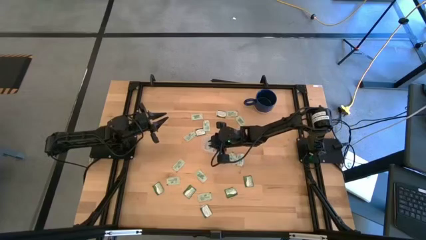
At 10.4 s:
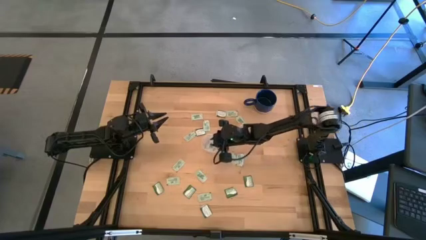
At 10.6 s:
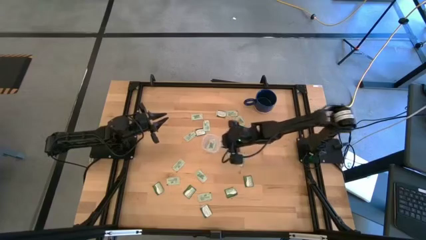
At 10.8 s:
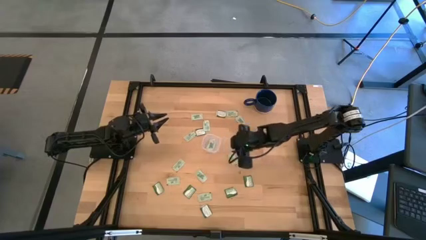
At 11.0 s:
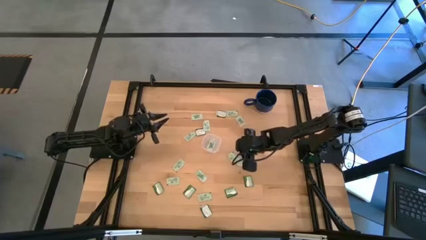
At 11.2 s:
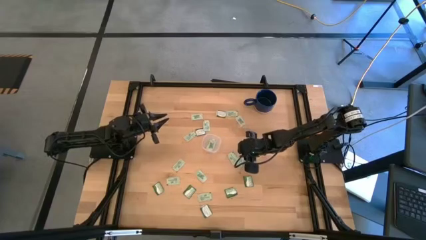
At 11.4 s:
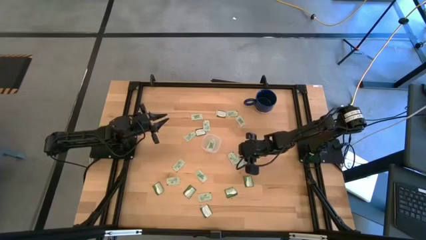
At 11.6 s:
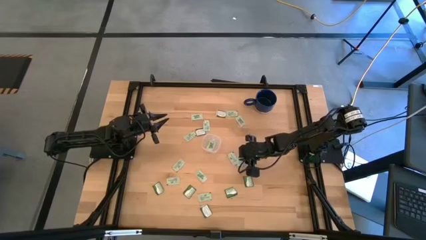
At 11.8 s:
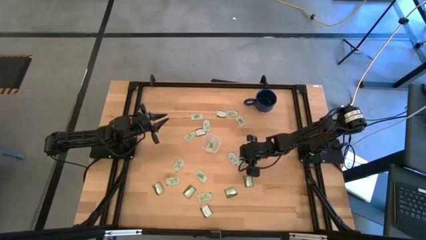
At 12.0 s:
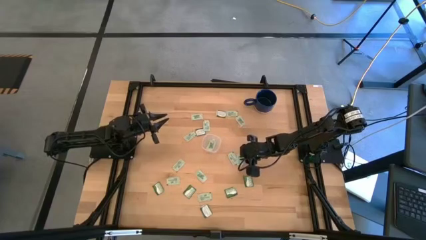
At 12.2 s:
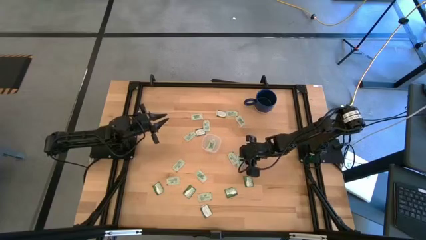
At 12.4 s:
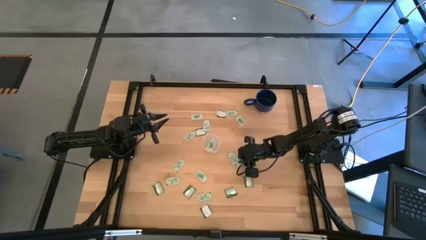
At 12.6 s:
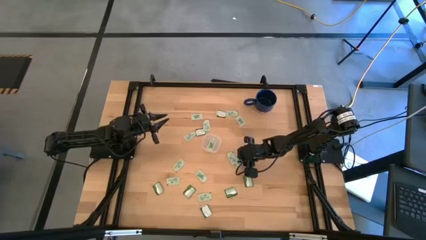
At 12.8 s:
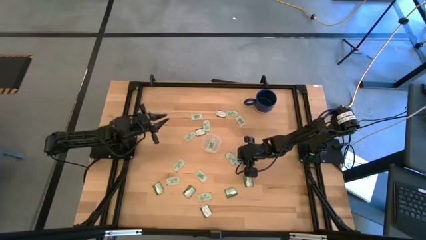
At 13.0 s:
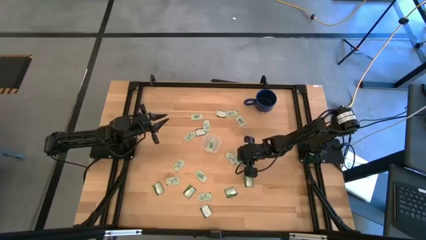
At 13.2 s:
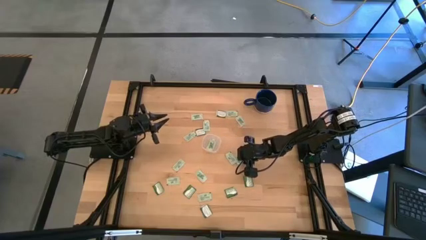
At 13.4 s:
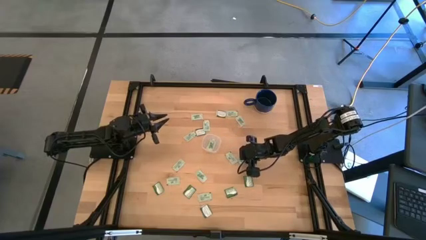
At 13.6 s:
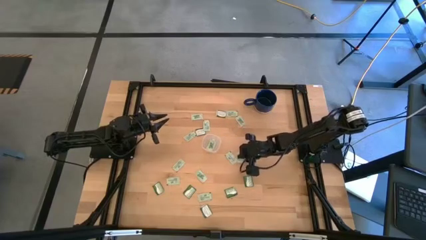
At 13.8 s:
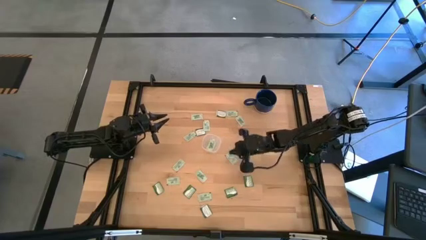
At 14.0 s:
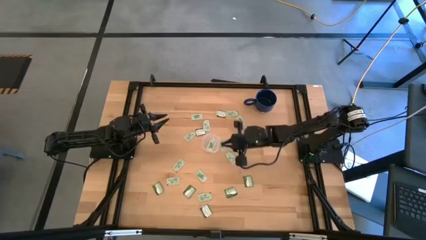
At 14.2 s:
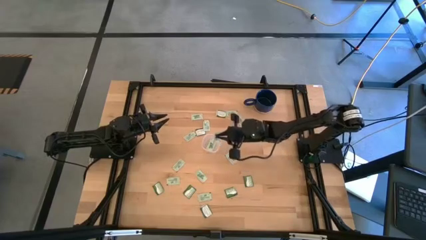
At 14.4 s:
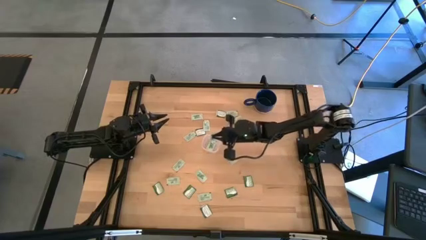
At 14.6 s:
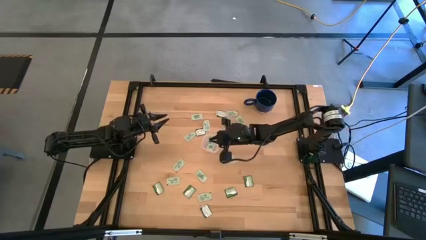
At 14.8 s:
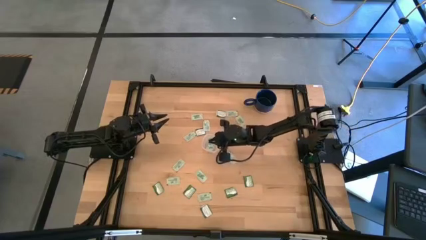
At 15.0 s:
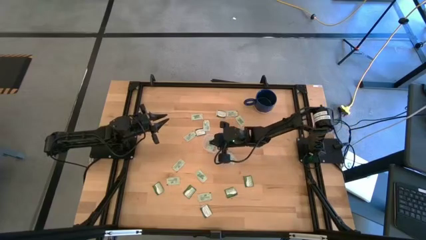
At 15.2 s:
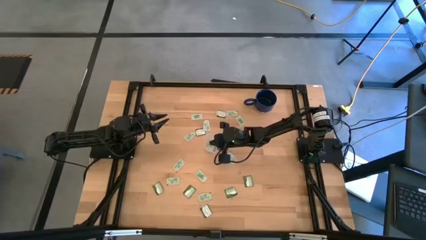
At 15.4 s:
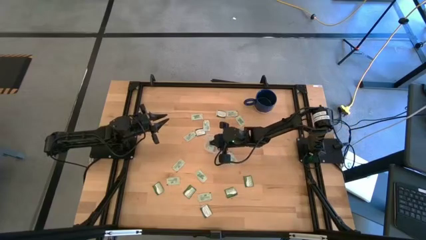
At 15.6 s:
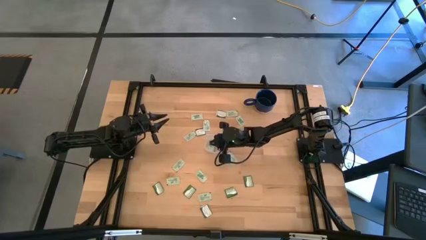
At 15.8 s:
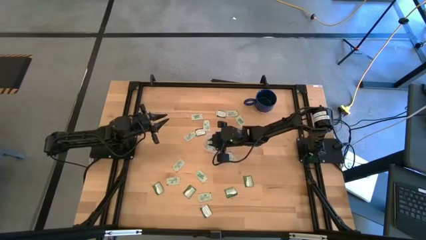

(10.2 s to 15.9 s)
Task: Pick and place Stevia / Truvia into bins
Put the light green stevia packet into the container

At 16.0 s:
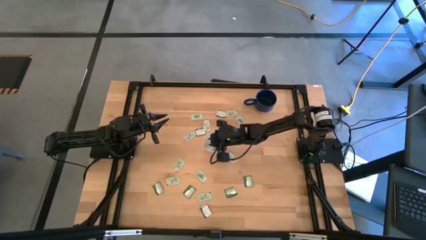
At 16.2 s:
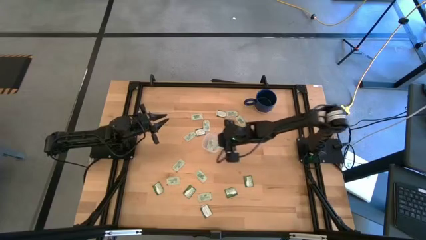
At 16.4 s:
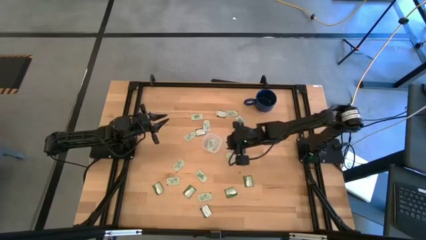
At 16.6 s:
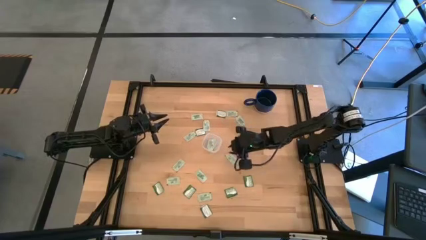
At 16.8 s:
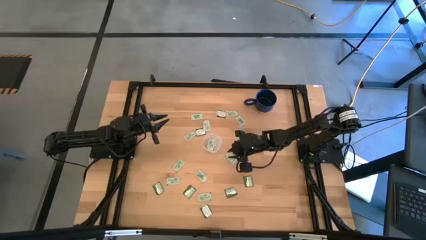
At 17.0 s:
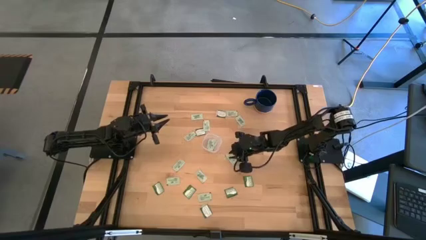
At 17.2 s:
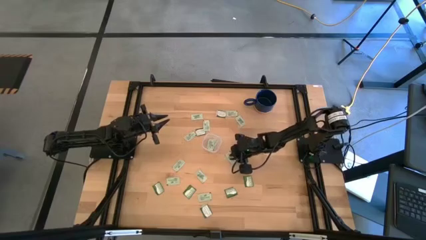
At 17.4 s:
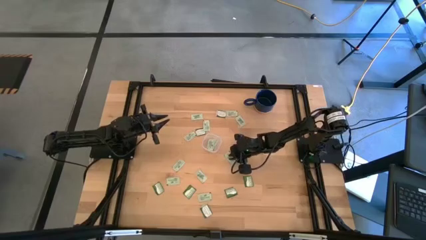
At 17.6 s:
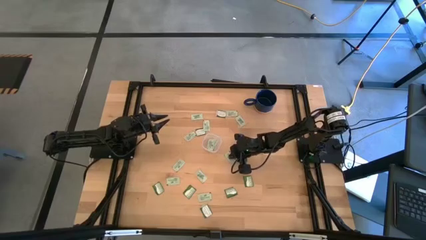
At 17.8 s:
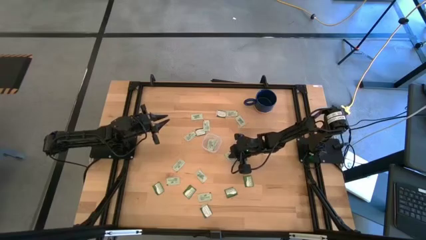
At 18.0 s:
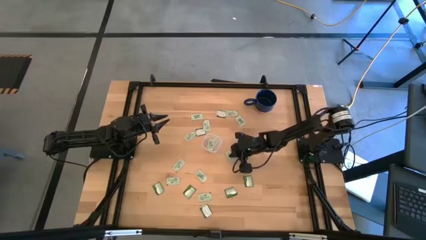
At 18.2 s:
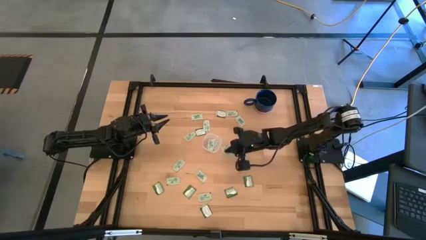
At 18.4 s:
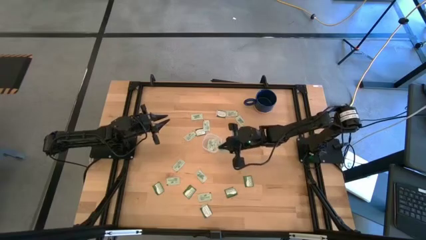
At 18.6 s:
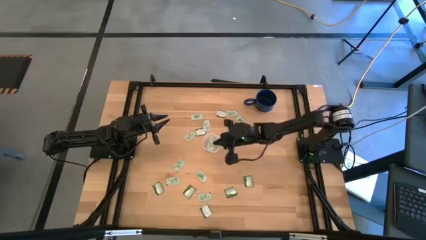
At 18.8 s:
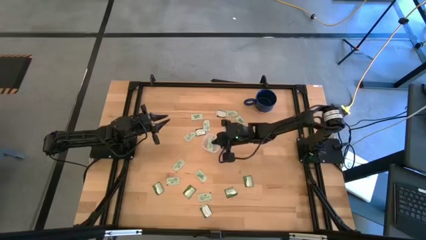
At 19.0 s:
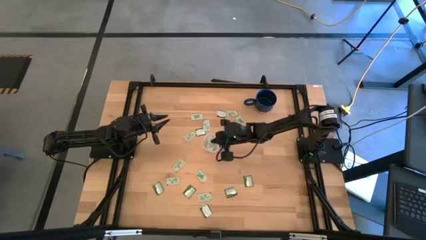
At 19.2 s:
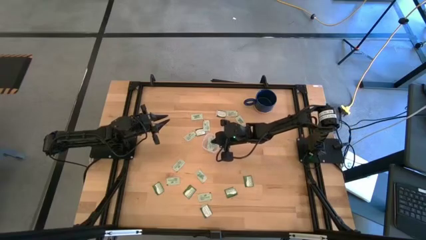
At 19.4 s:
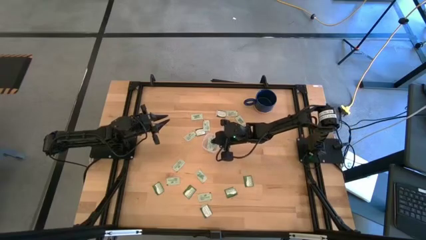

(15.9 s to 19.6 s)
Put the light green stevia packet into the container

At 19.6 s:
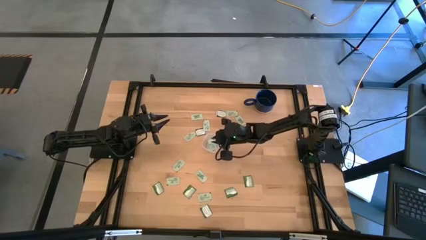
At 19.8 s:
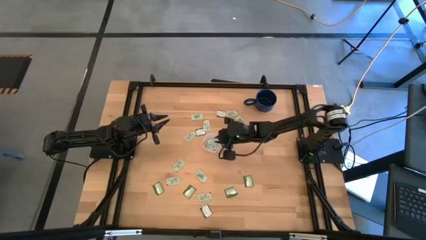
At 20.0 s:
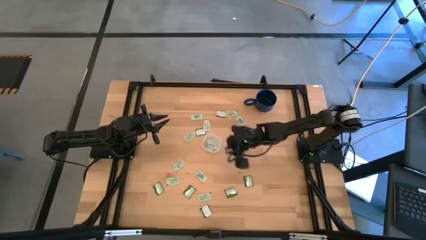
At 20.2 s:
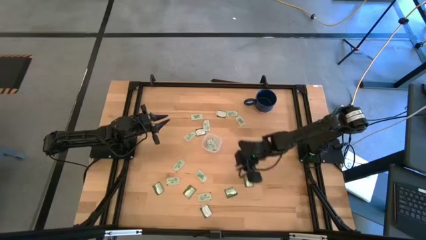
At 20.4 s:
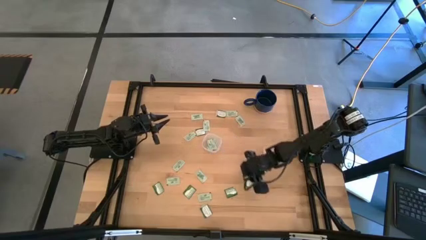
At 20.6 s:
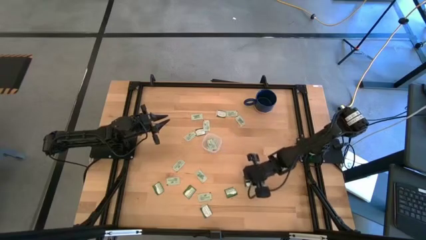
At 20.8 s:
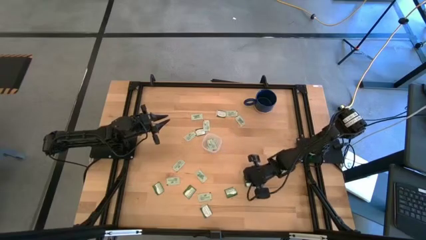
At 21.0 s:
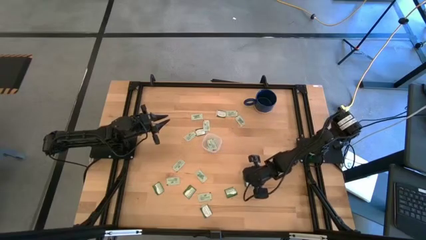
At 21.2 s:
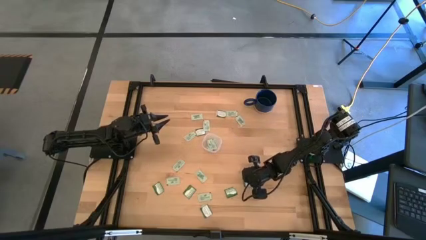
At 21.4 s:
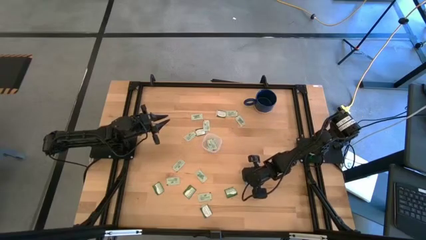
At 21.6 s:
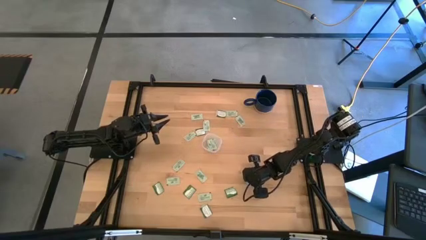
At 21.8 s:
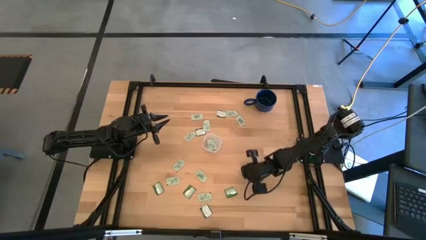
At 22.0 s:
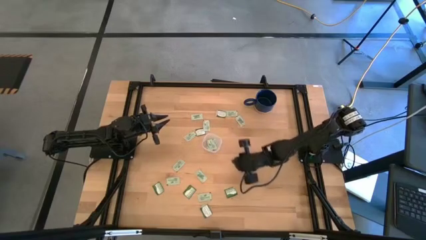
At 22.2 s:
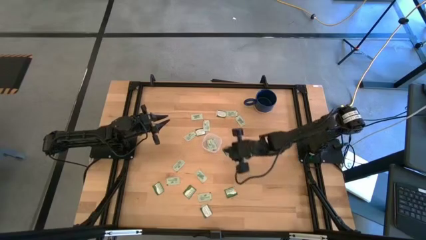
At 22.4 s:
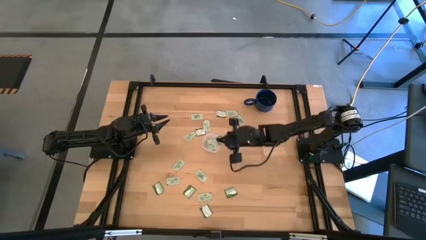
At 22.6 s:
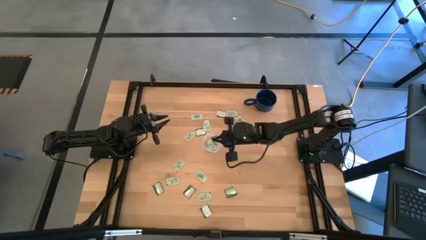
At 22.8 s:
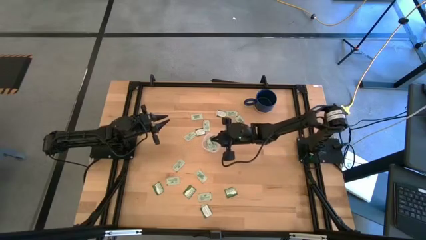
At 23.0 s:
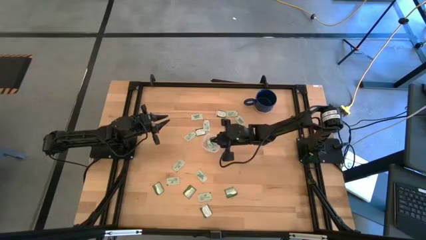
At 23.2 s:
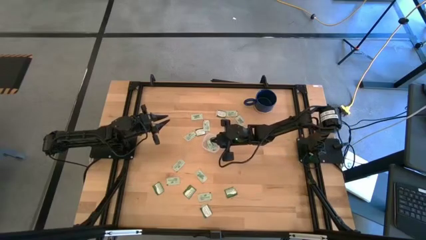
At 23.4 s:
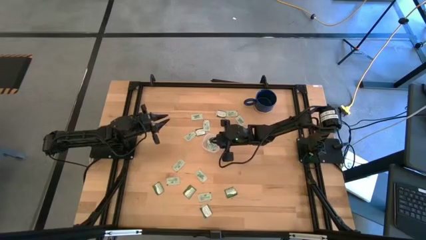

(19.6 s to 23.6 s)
Put the green stevia packet into the container

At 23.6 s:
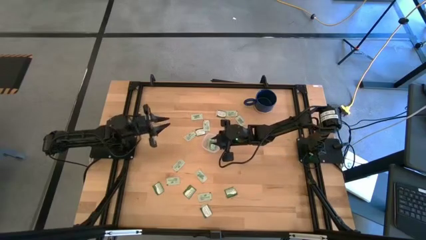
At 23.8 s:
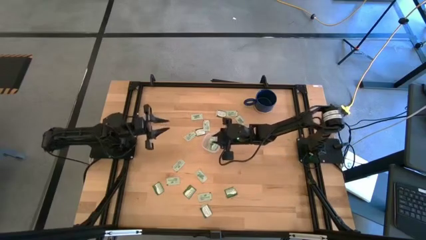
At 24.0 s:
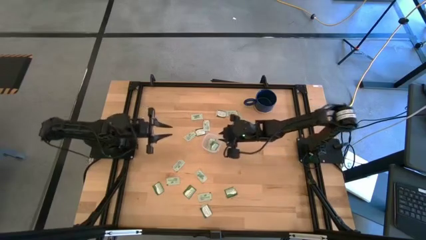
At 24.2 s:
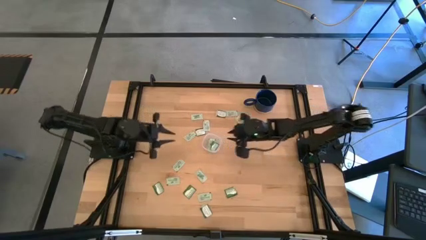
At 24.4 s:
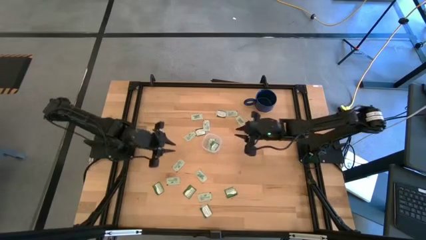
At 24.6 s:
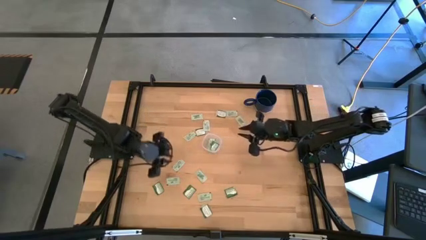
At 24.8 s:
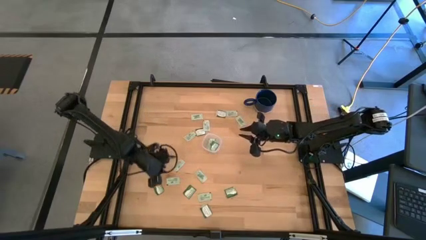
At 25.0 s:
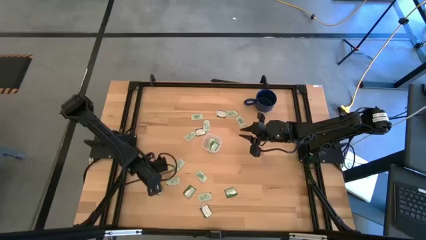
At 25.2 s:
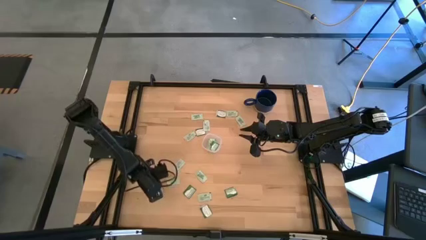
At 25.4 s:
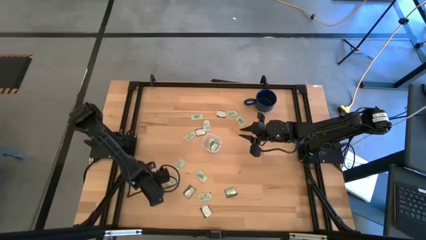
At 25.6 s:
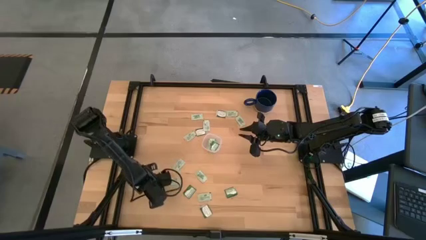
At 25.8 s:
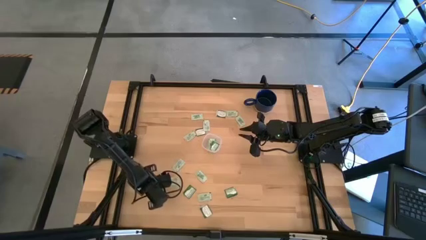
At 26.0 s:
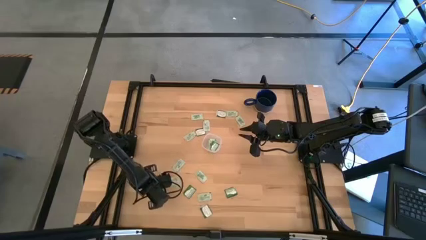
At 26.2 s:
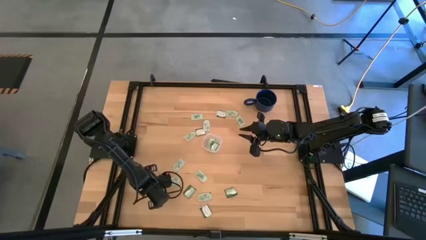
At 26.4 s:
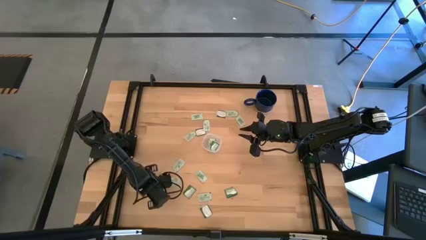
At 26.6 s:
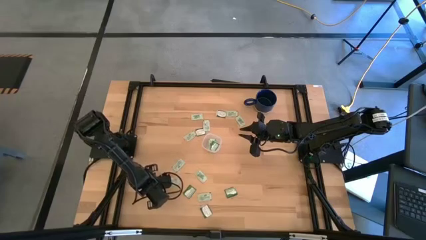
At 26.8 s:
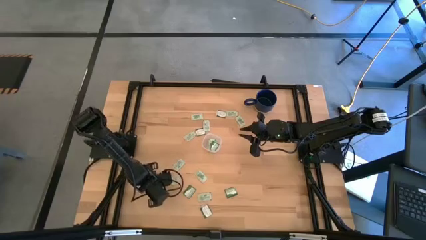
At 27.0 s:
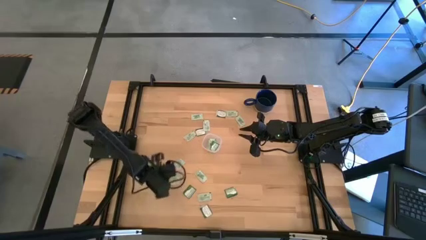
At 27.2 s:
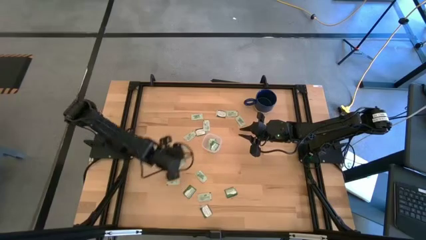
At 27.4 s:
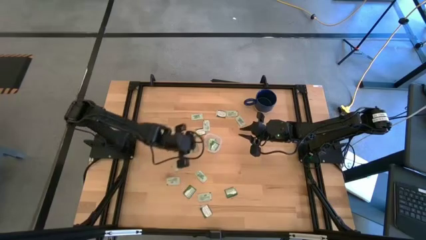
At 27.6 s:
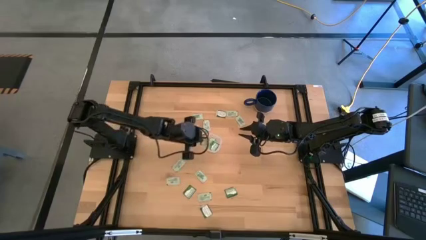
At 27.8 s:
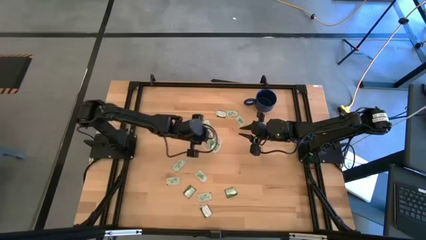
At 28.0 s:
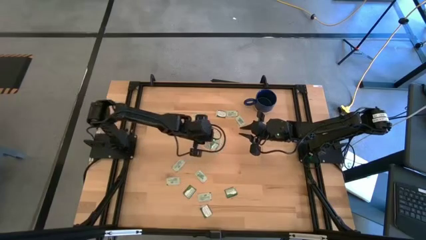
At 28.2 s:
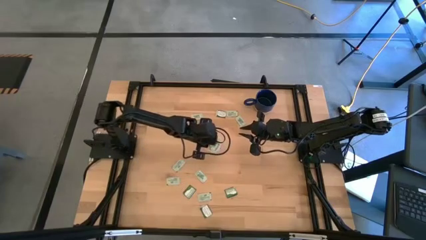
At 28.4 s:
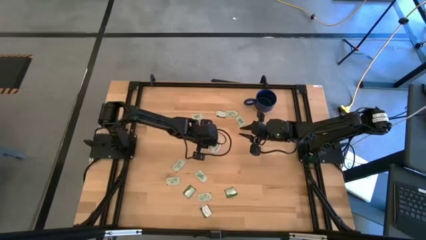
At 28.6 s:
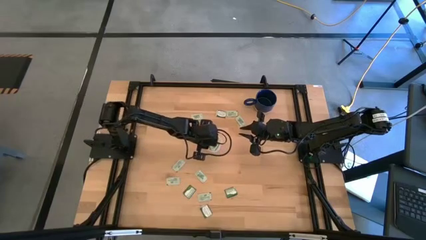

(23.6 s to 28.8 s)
Put the green stevia packet into the container
